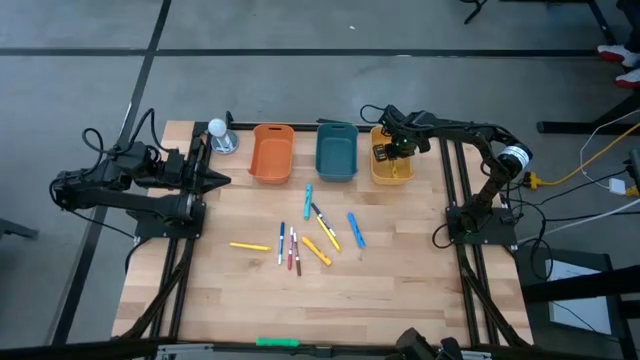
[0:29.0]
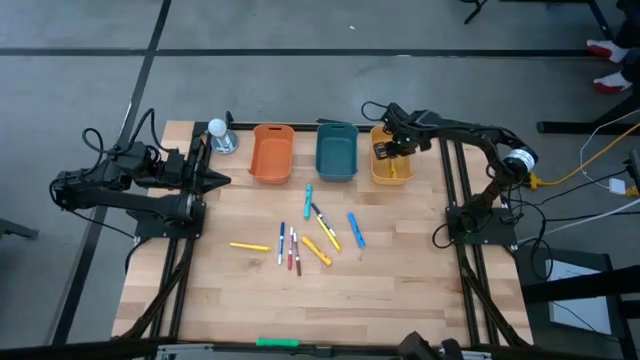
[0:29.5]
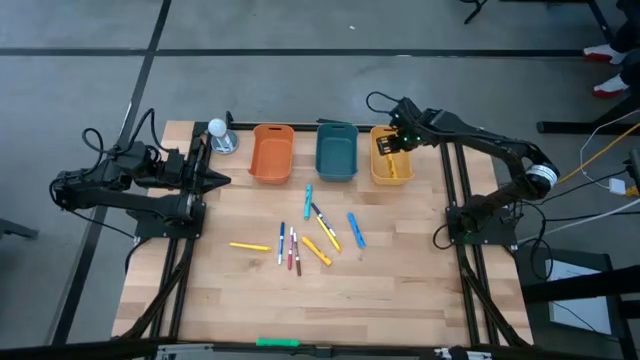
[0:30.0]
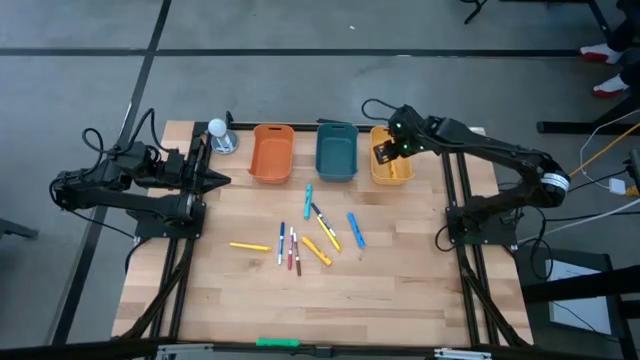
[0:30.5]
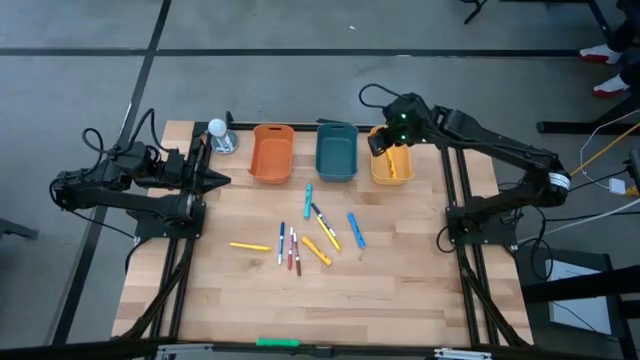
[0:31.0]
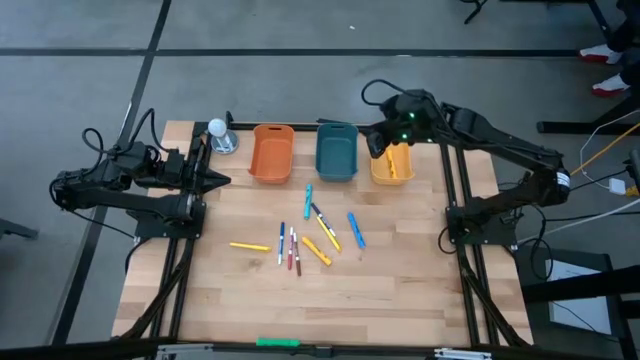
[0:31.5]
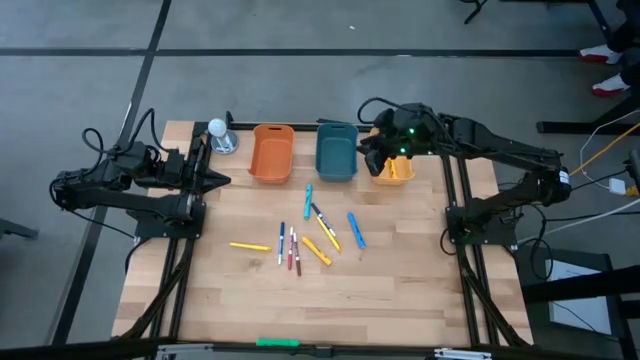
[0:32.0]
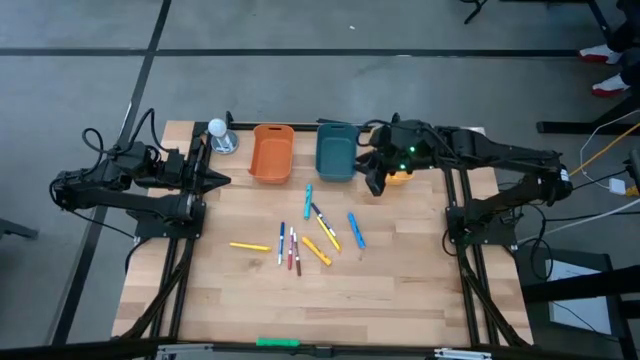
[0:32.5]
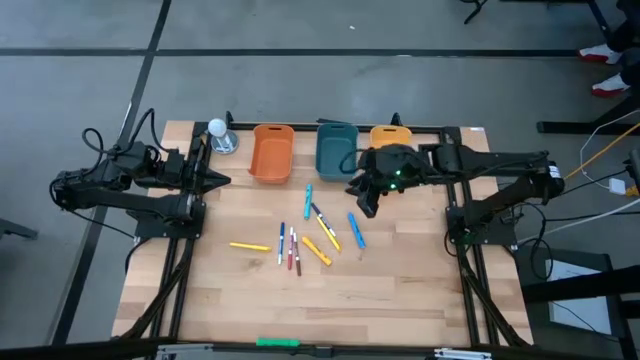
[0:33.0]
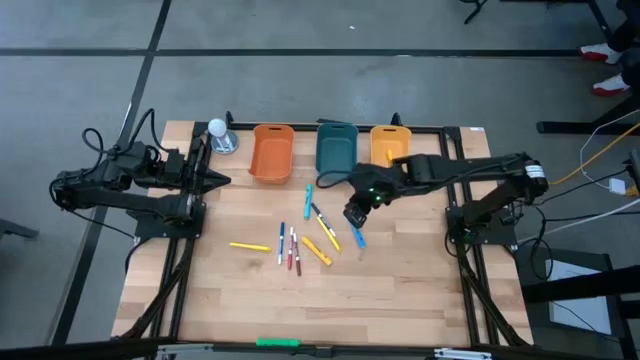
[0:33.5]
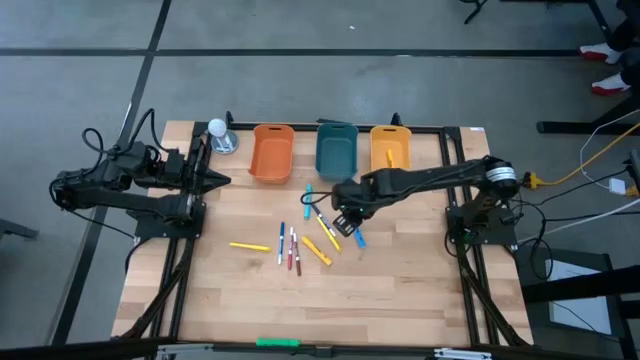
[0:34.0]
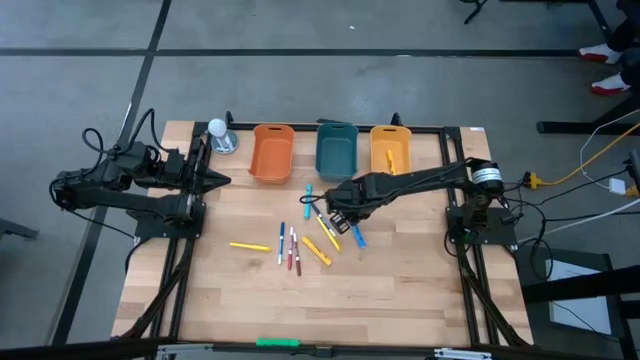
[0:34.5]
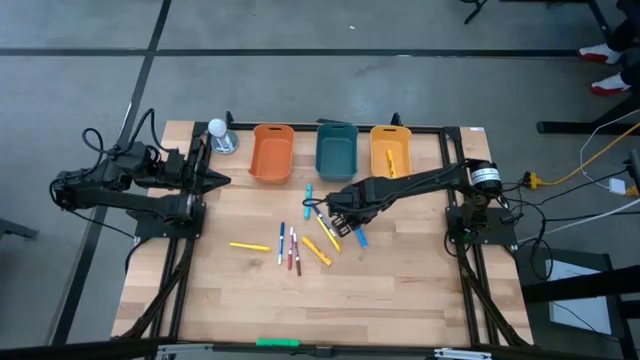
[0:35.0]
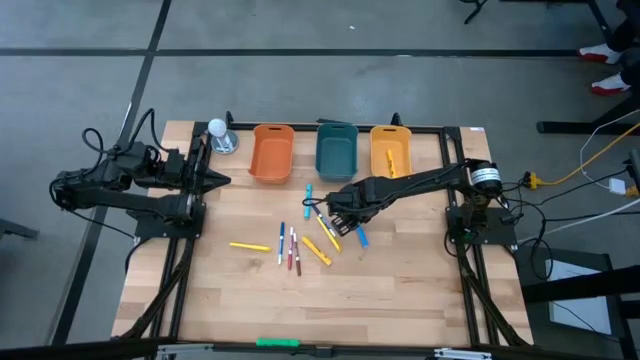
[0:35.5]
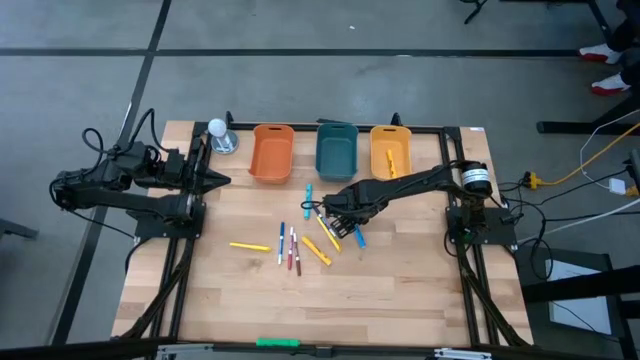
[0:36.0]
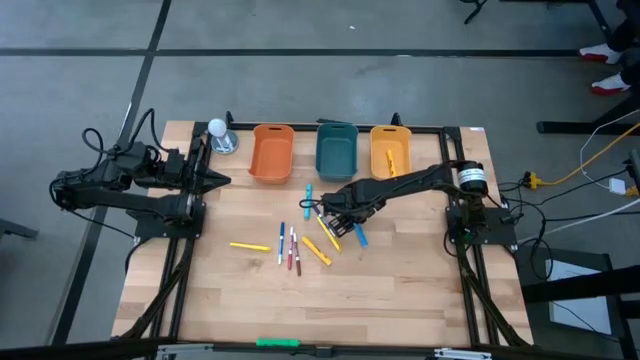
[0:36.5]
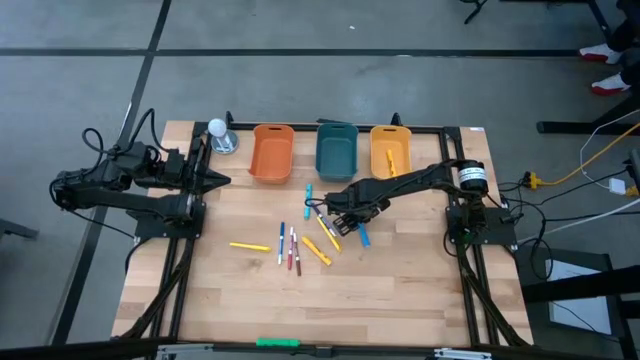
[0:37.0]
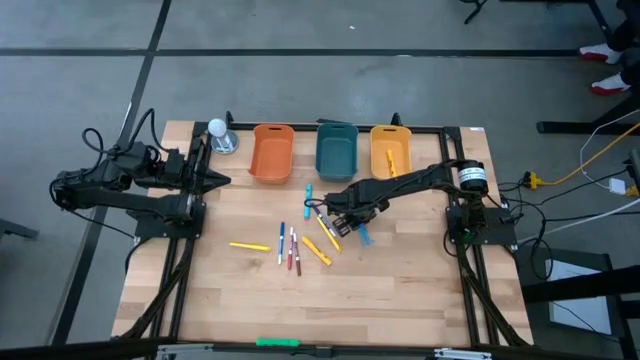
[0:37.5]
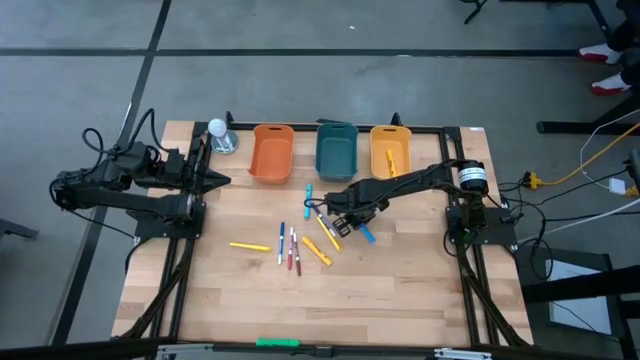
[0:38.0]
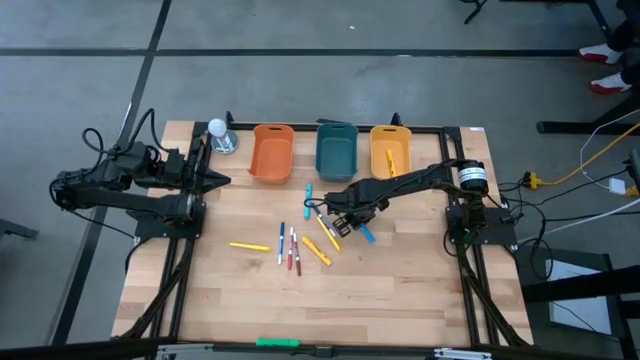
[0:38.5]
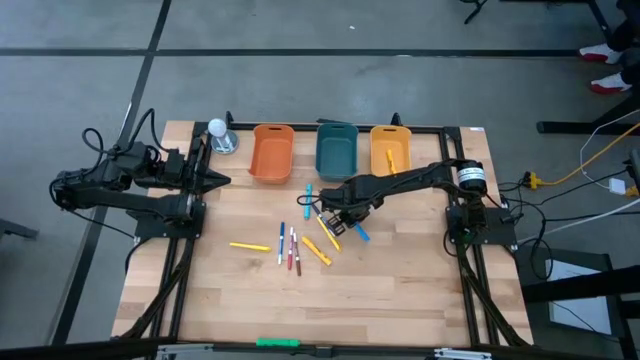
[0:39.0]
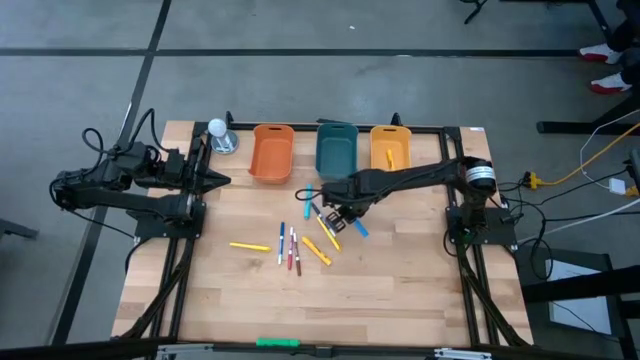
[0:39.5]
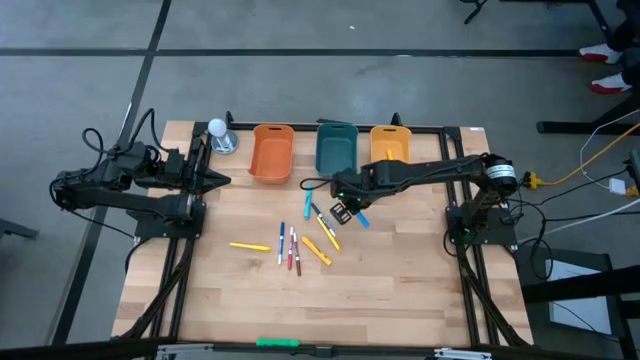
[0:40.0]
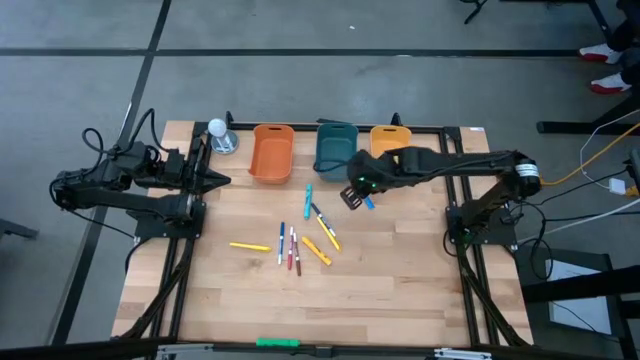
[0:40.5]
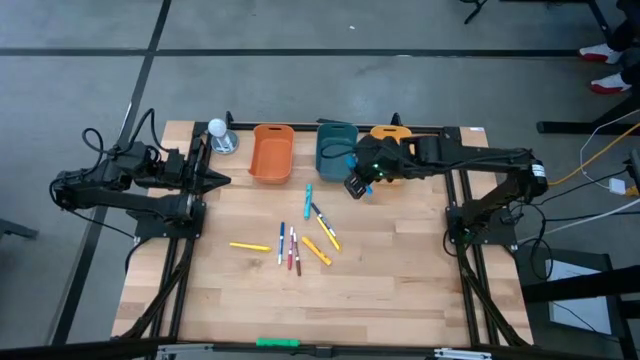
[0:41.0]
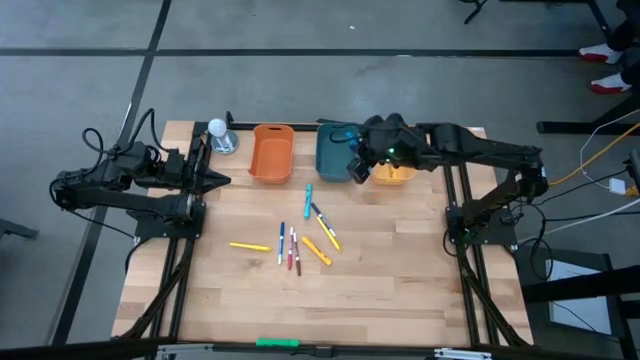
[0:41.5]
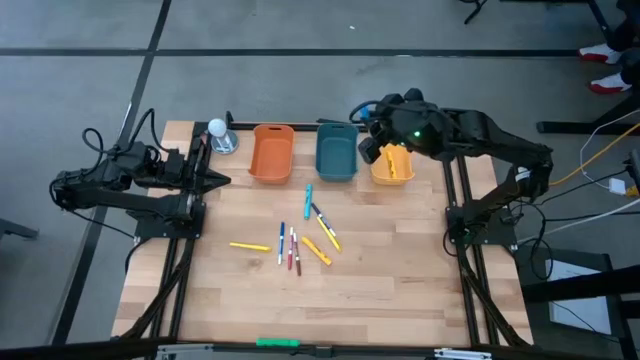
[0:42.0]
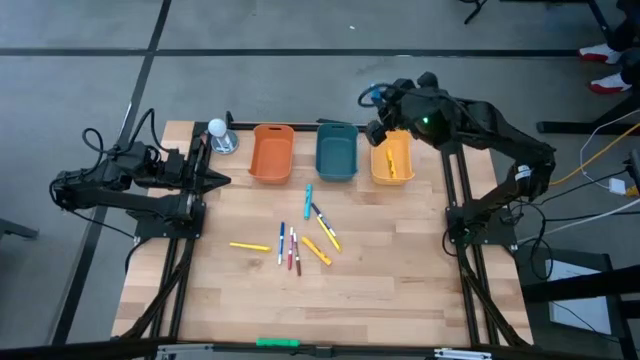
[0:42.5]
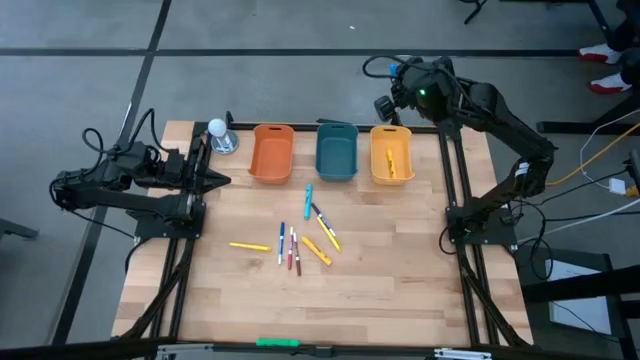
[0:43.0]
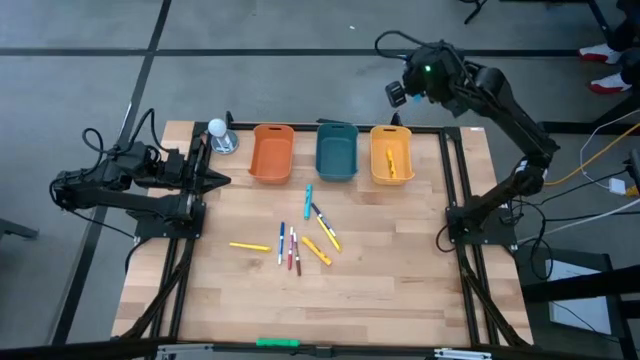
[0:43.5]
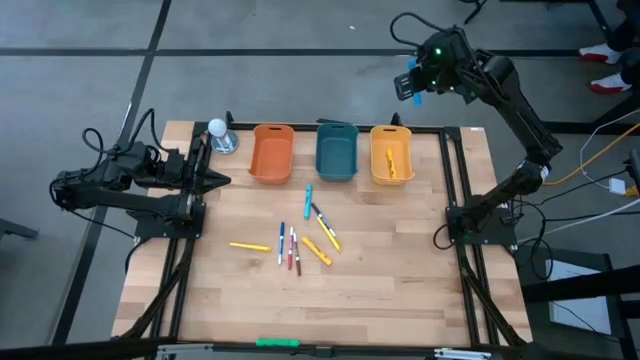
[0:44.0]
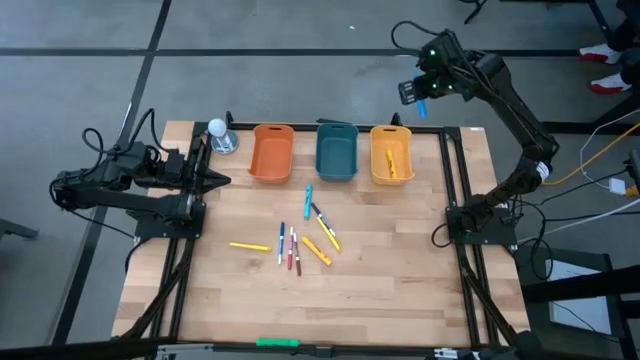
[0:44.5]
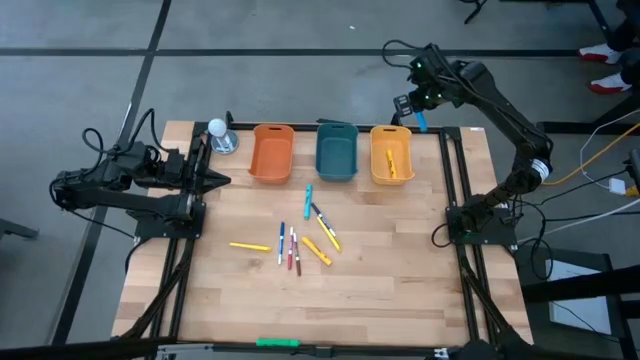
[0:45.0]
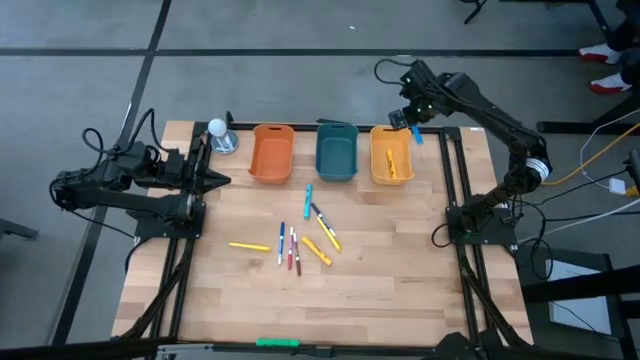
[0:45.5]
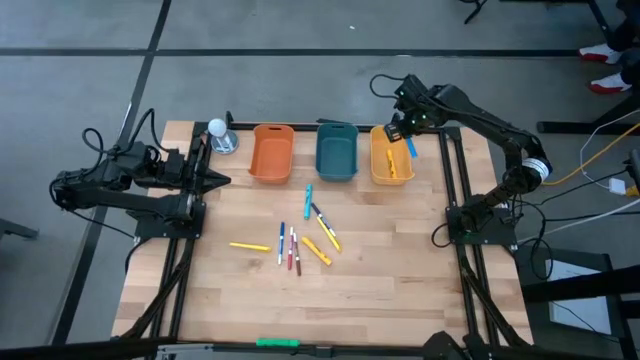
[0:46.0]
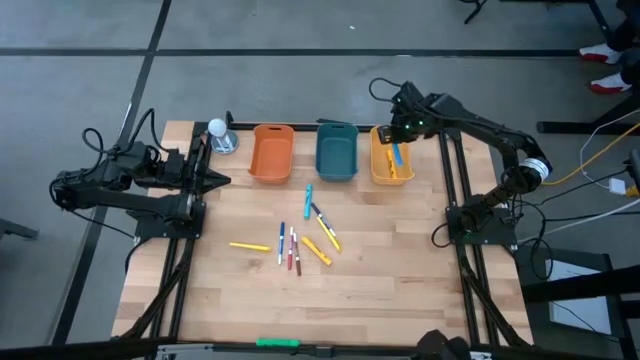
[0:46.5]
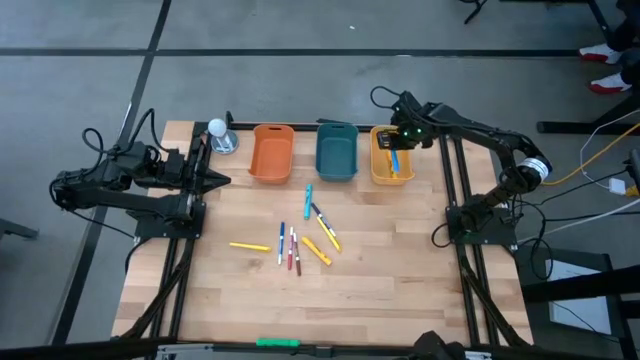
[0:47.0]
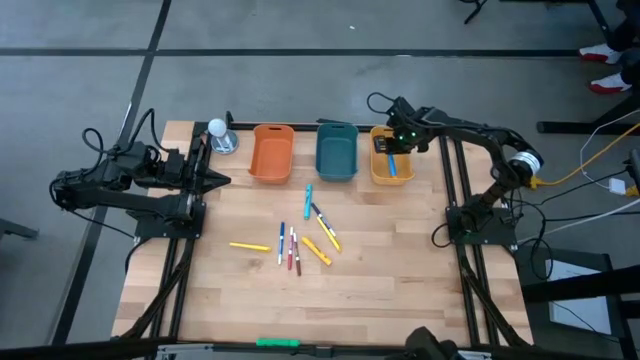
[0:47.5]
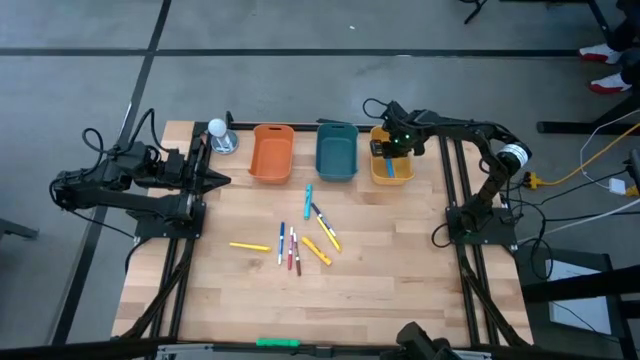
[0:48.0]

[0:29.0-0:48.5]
Task: Pick & Place Markers
Put the blue highlighter pen into the yellow bin

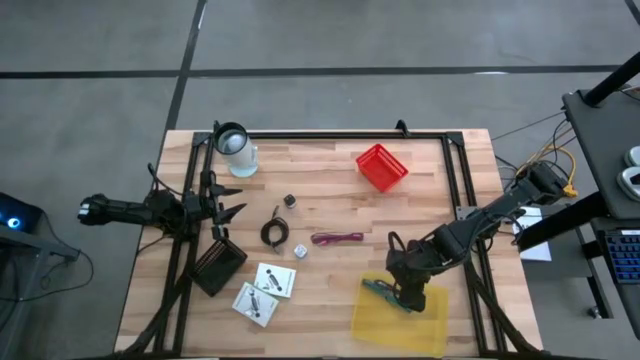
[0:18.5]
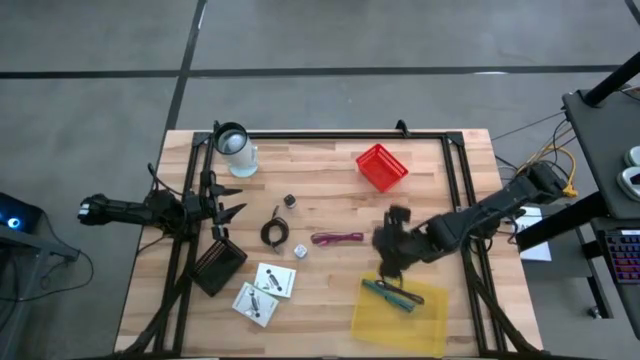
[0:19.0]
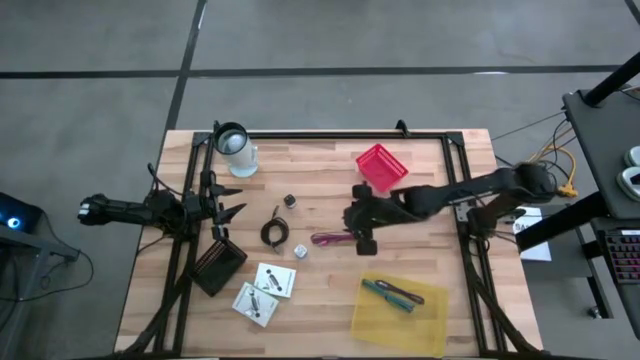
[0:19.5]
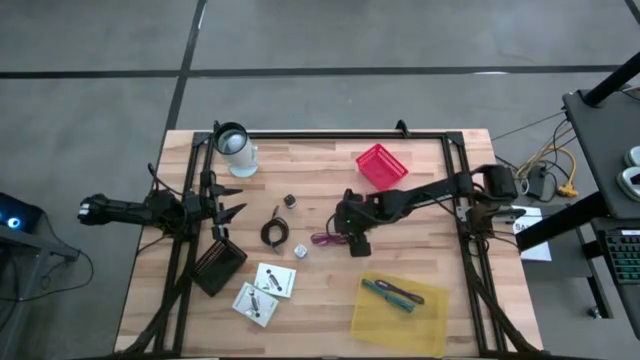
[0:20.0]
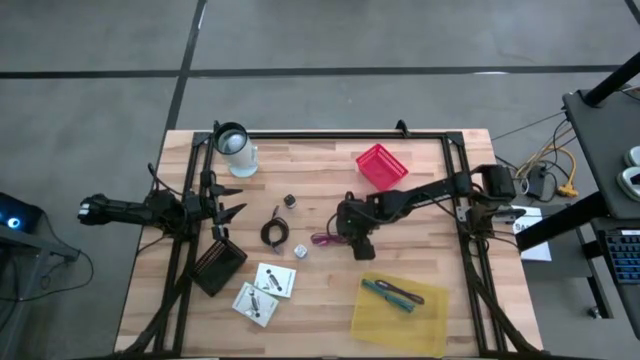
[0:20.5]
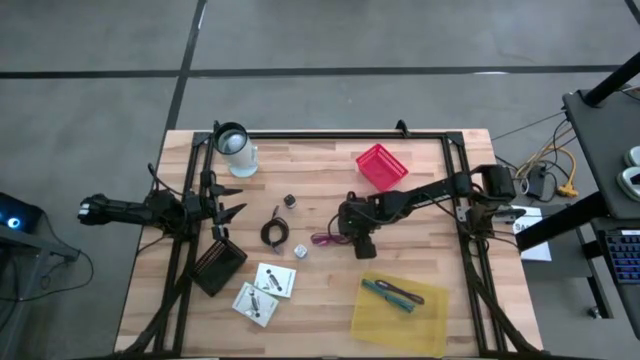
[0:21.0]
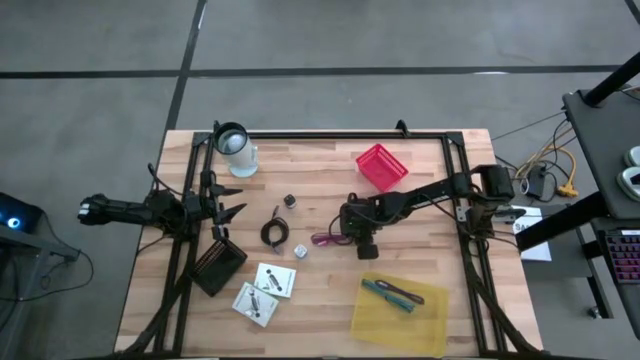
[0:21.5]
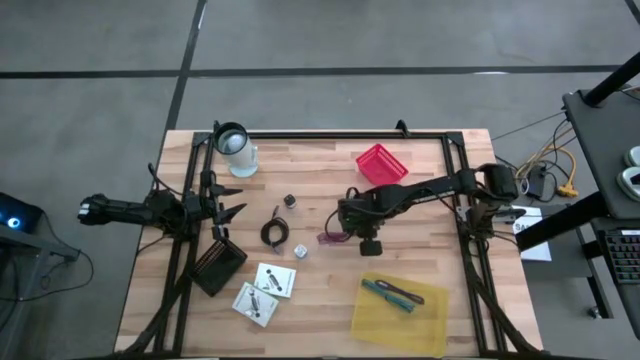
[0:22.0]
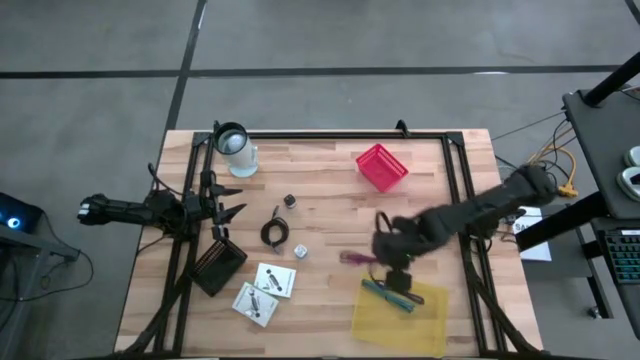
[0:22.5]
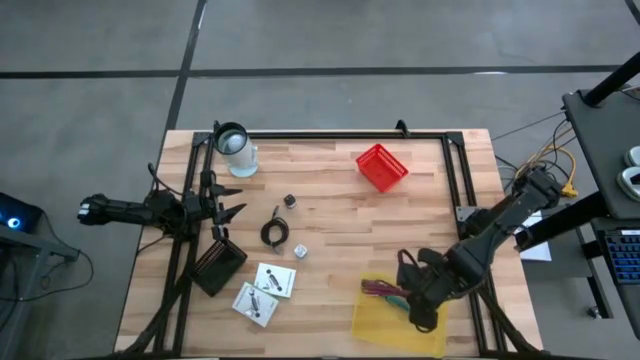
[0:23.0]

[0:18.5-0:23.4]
Task: Pick and place items into bin
Put the pink patterned charger cable into the yellow bin
